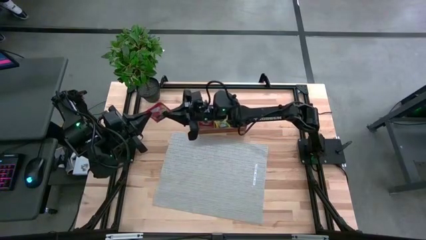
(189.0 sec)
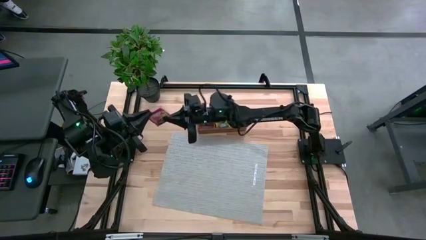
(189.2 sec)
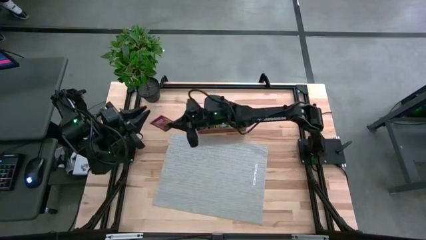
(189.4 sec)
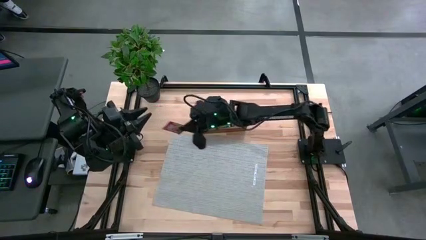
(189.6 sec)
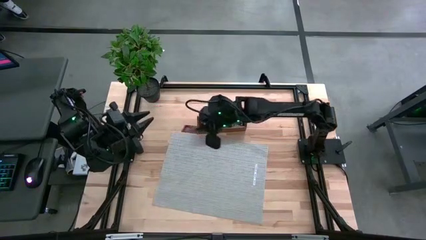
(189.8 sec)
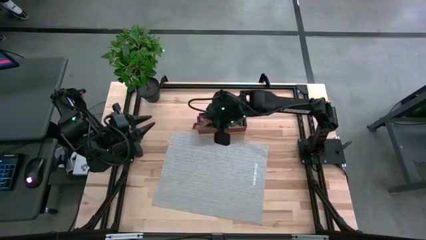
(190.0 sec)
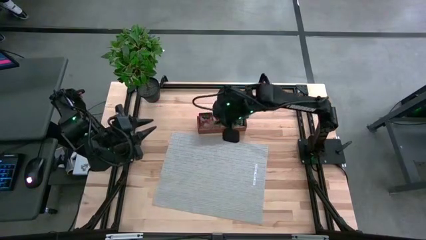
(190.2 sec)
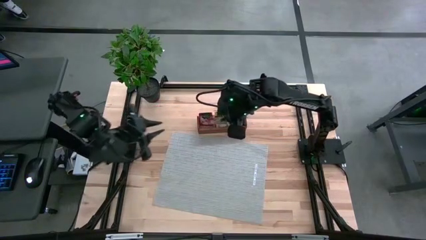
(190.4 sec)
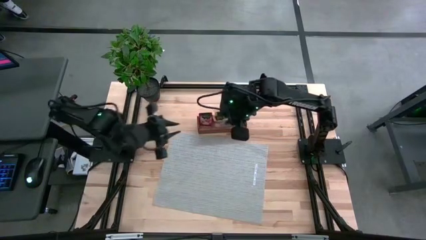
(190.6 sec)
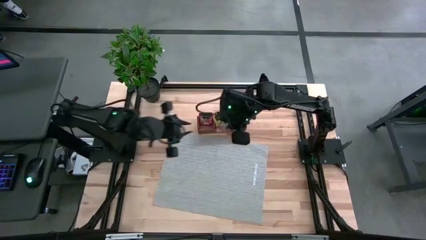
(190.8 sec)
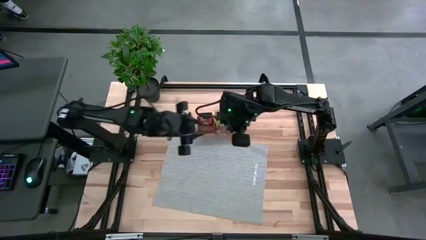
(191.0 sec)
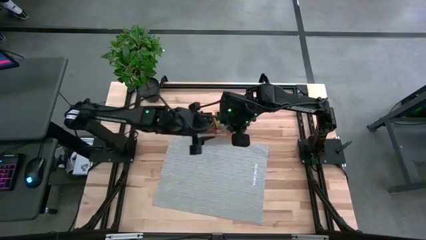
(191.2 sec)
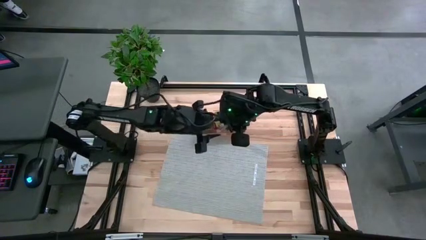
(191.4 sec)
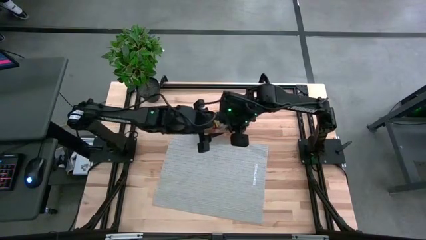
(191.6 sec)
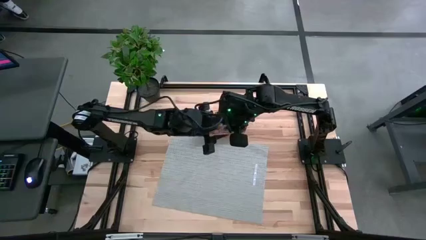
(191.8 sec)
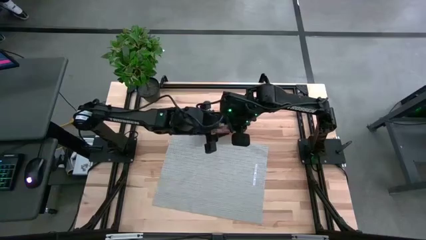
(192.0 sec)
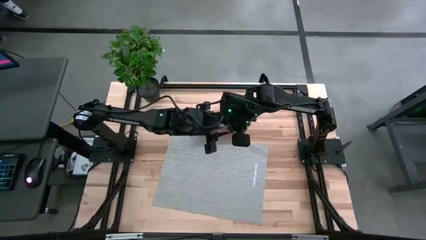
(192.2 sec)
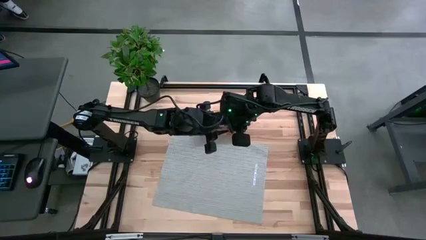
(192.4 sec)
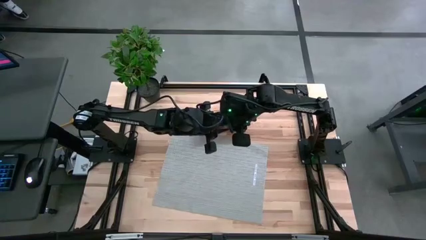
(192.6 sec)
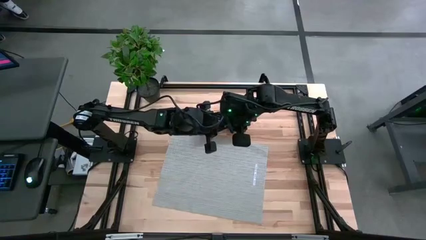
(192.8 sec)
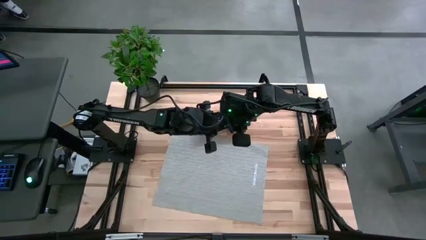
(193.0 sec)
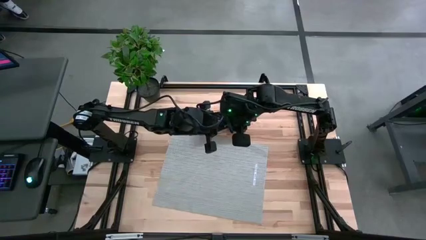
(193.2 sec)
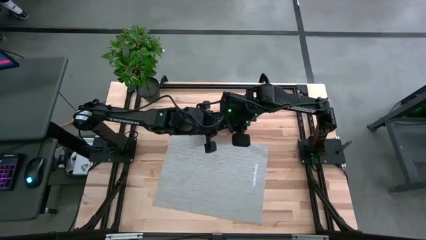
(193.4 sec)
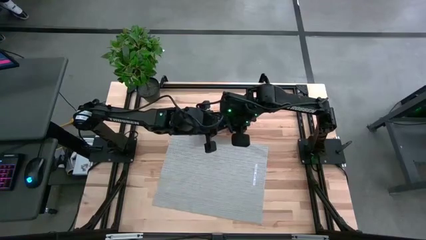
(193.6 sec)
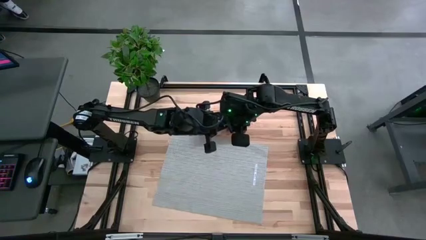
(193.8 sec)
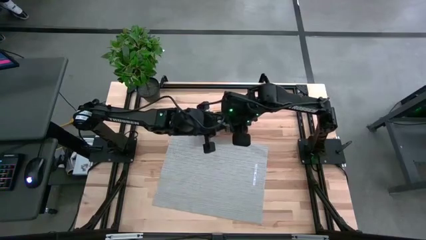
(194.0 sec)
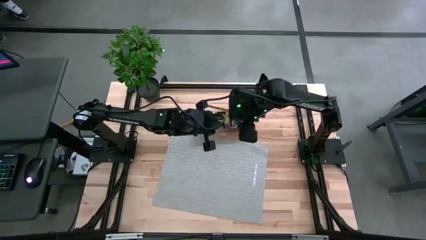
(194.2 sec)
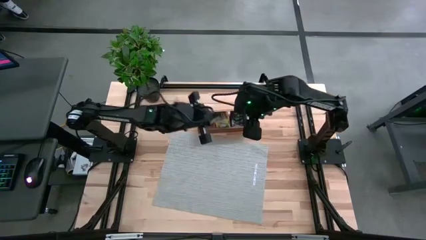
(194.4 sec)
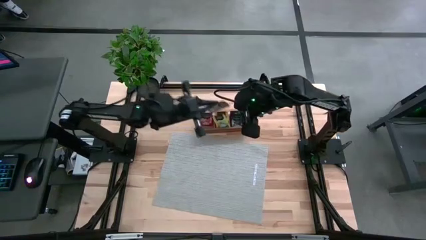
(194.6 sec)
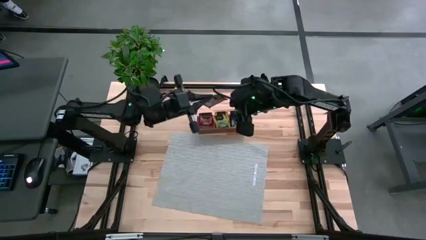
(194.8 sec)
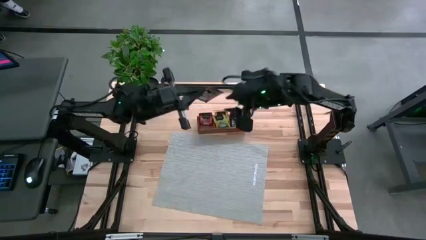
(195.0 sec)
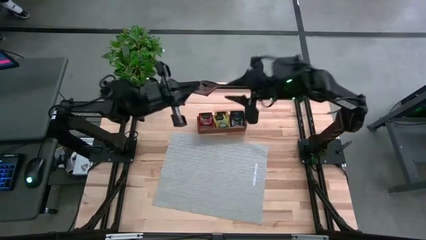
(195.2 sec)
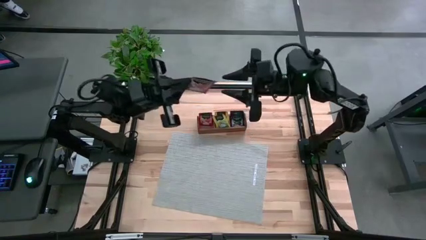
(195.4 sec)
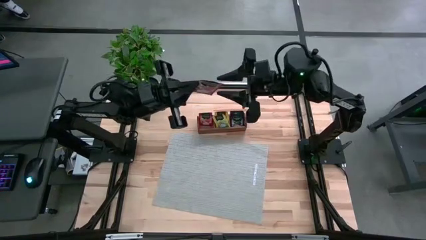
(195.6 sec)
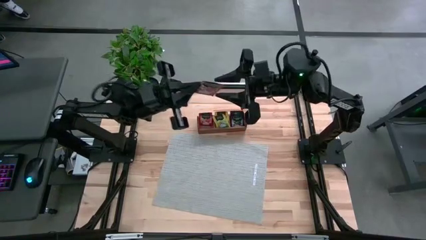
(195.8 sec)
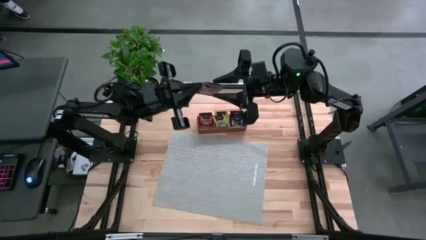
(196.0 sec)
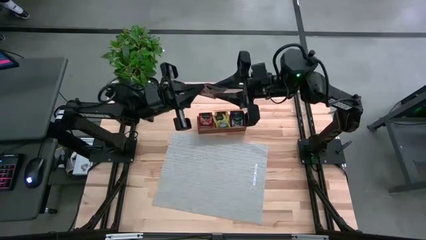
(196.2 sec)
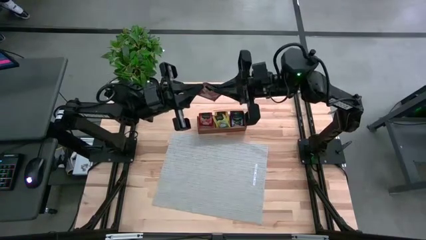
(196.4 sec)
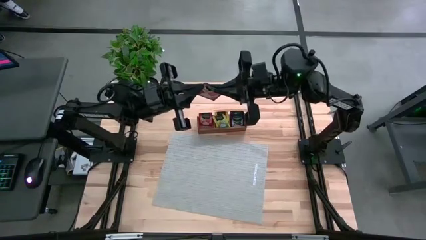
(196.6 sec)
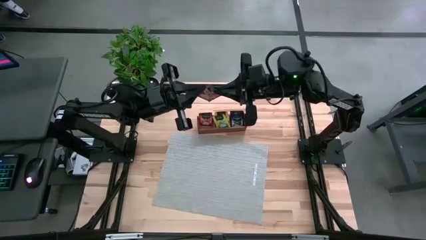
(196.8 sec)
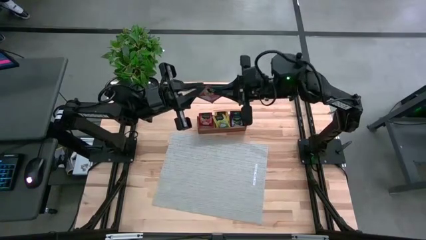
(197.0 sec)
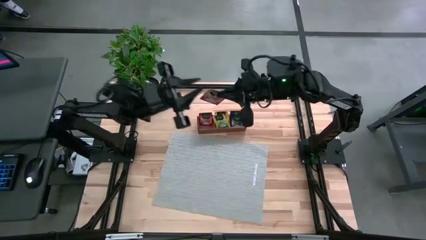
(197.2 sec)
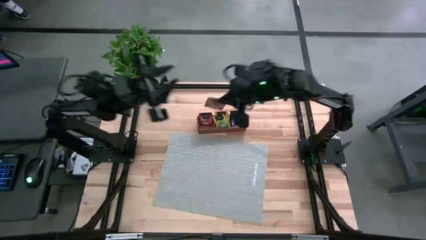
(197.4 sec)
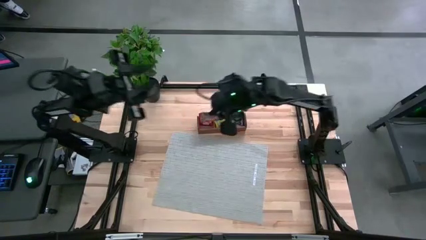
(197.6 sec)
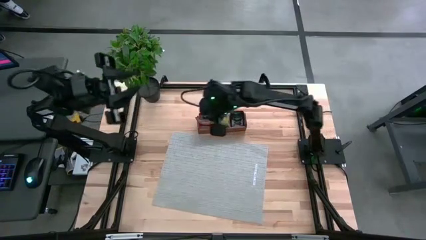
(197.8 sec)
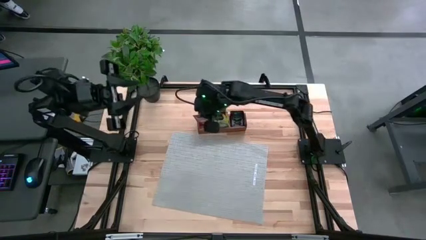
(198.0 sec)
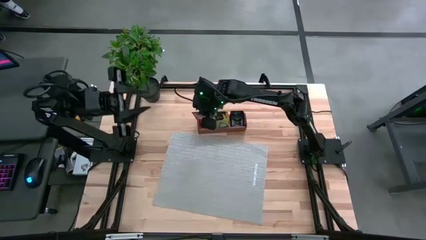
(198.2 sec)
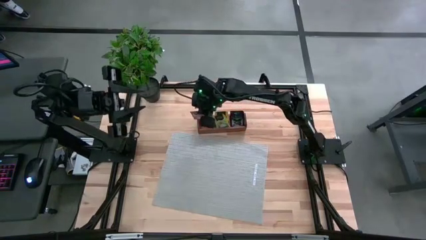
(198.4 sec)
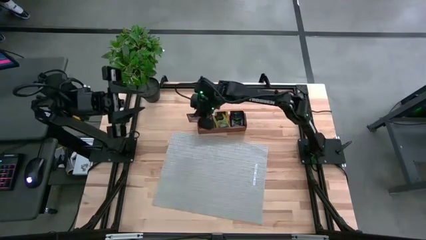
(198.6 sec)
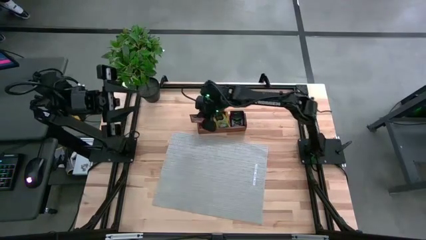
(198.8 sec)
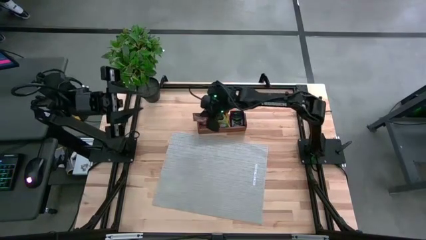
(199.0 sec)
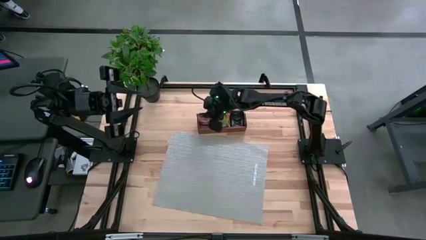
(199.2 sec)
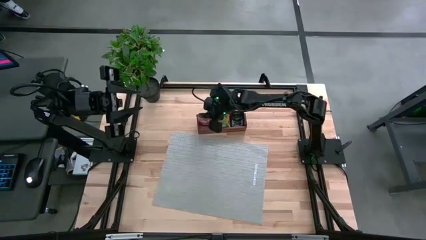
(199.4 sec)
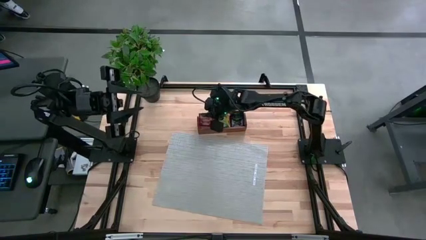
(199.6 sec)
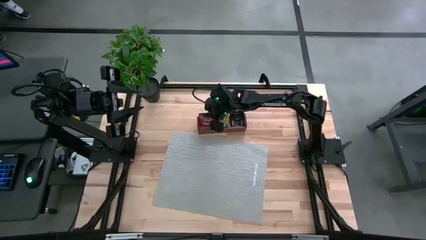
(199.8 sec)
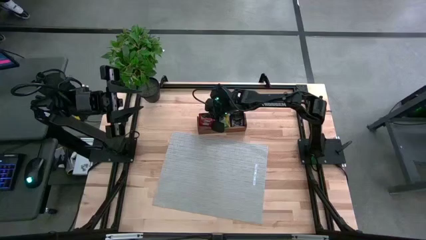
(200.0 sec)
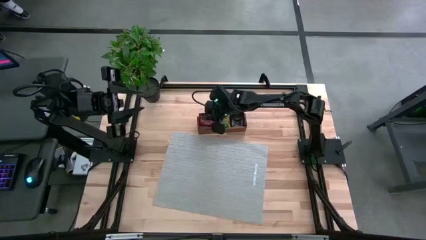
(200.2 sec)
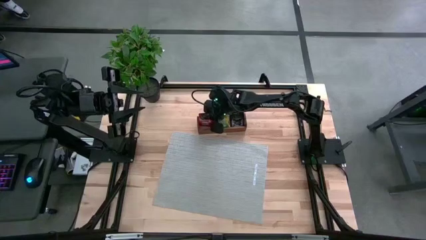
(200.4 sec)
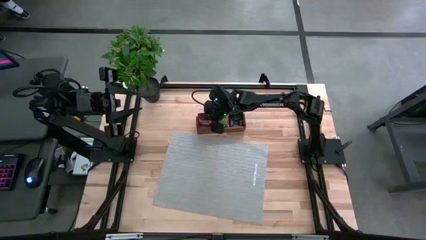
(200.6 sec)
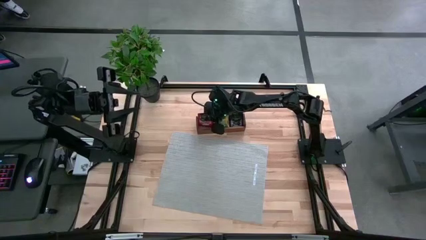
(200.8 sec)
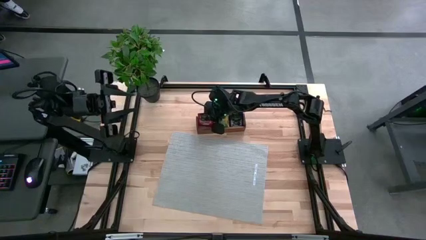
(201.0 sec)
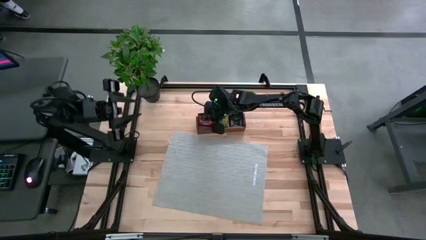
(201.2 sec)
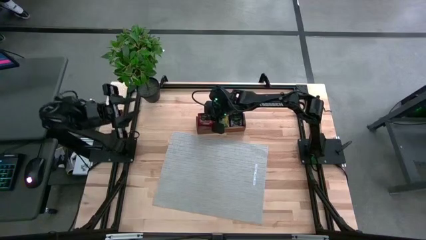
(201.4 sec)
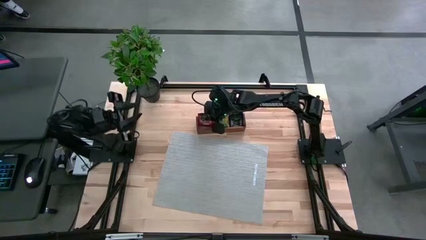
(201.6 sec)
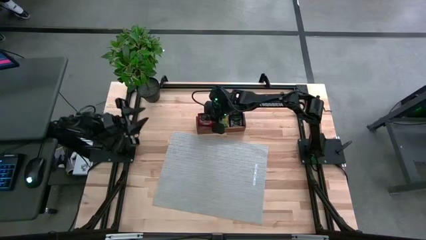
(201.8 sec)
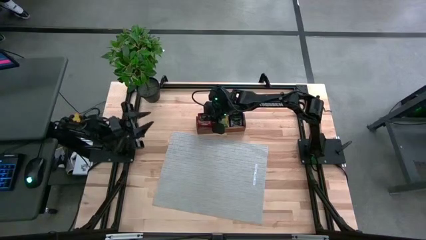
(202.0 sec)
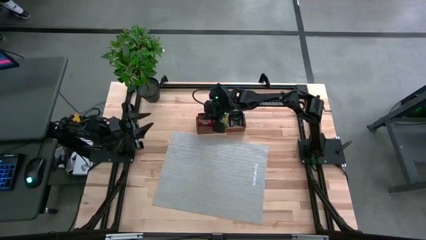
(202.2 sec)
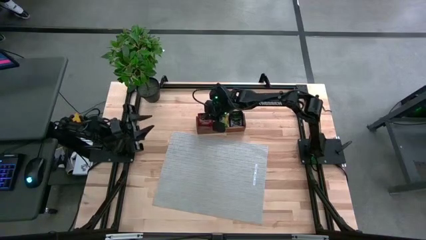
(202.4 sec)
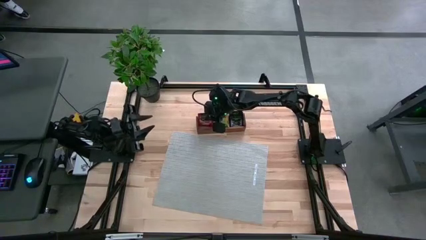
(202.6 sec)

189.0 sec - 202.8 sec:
Task: Pick & Place Tea
Put the red tea bag into the left section of the wooden organizer

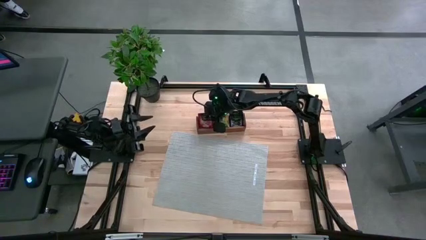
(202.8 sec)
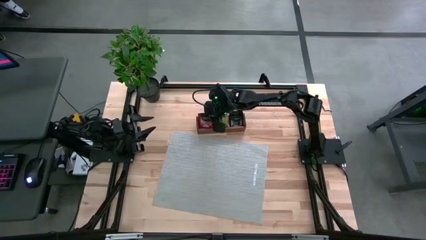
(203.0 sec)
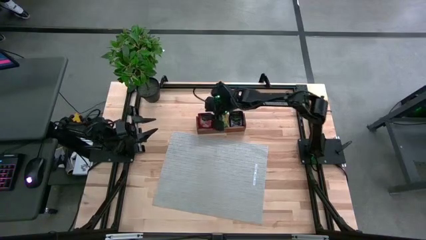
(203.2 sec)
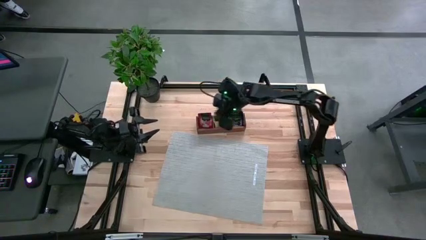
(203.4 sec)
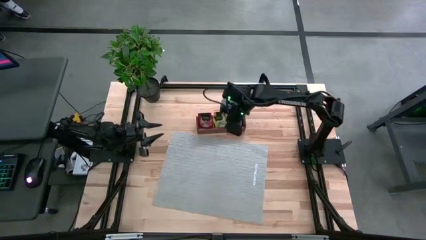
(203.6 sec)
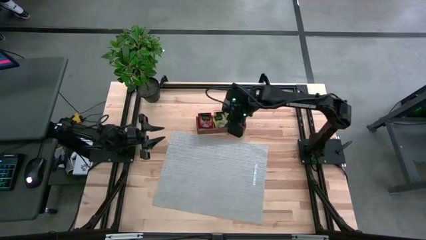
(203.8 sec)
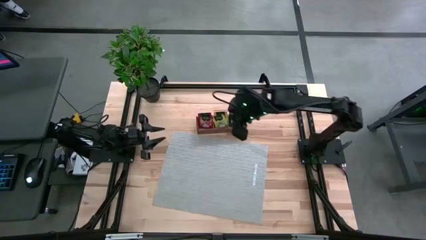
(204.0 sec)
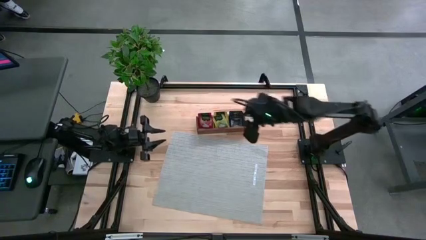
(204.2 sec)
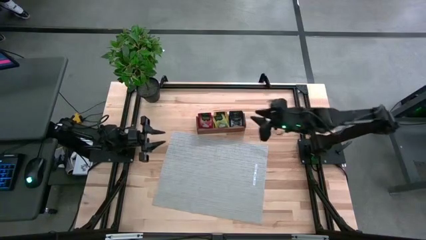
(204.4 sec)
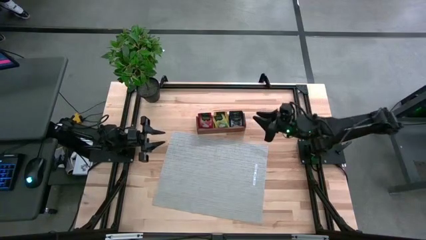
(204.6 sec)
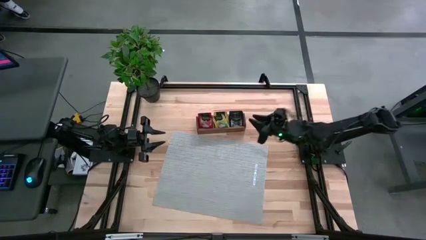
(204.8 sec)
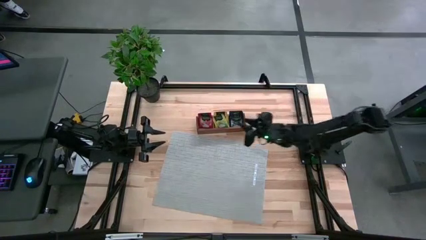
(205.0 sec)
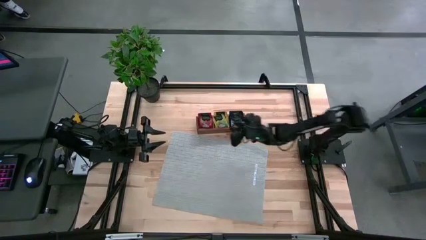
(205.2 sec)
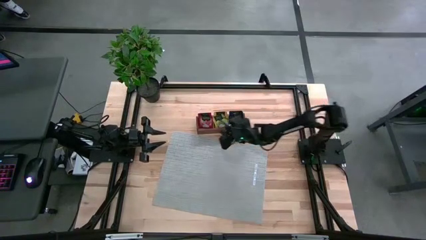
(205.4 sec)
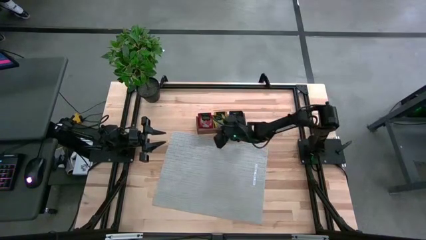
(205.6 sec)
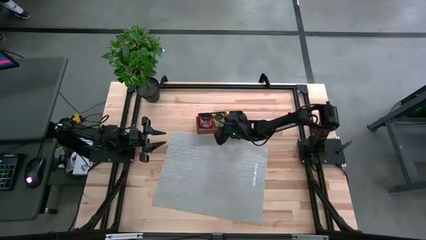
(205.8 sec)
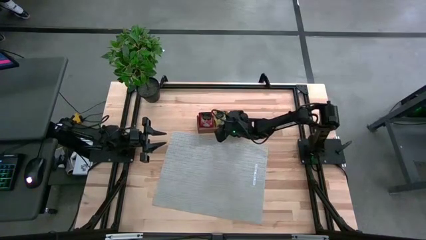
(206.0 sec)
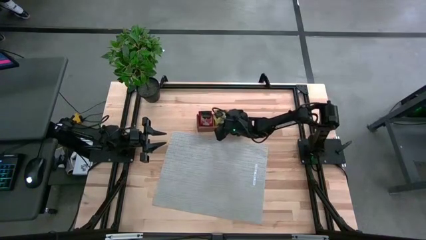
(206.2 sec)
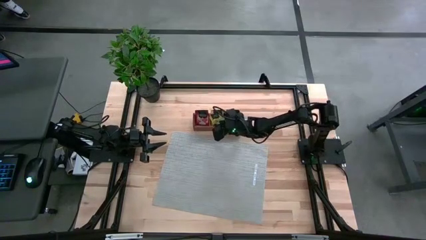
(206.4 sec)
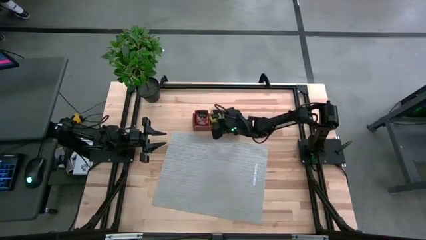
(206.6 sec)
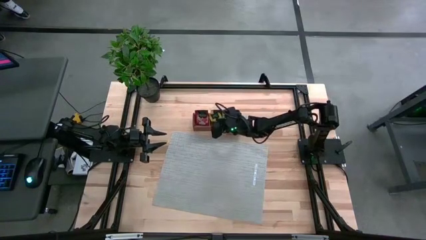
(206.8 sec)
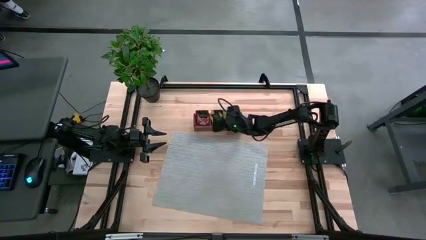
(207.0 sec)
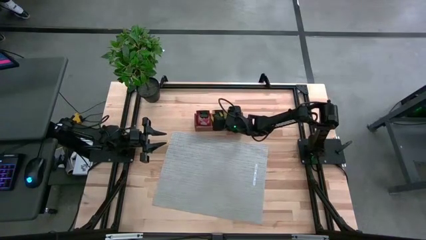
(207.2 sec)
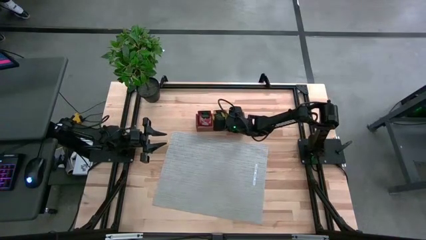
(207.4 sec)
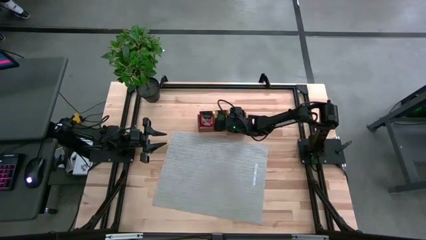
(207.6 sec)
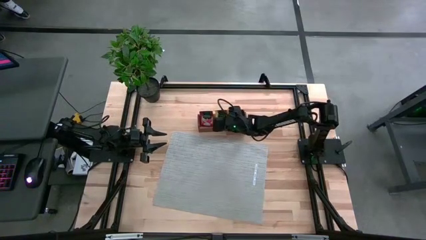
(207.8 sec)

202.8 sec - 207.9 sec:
Adjust the yellow tea bag
